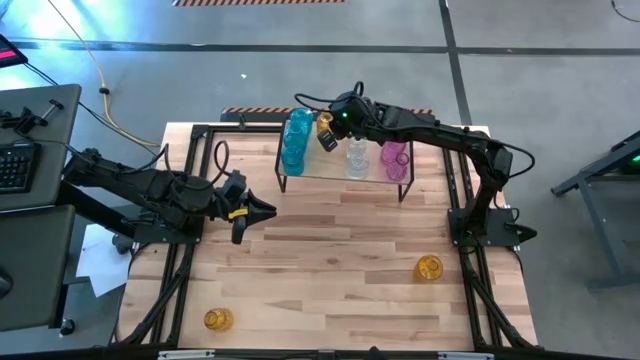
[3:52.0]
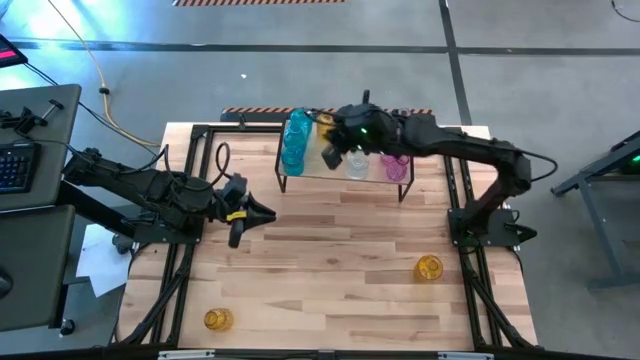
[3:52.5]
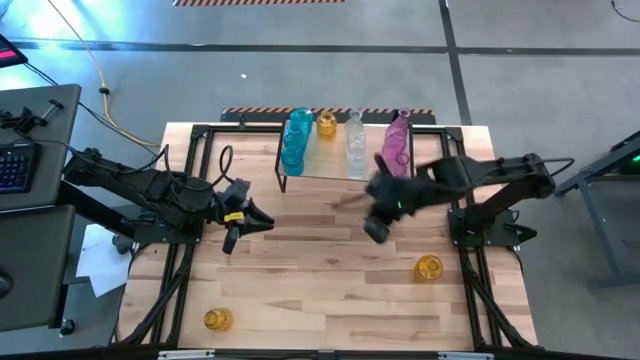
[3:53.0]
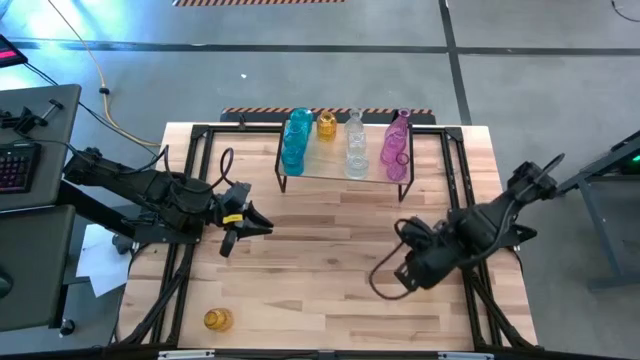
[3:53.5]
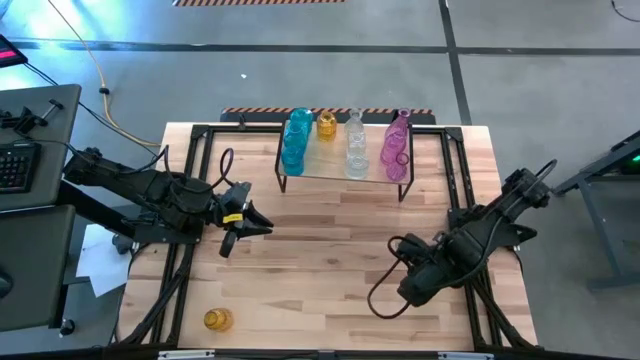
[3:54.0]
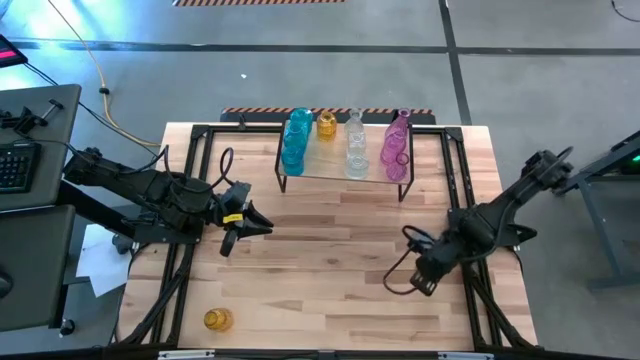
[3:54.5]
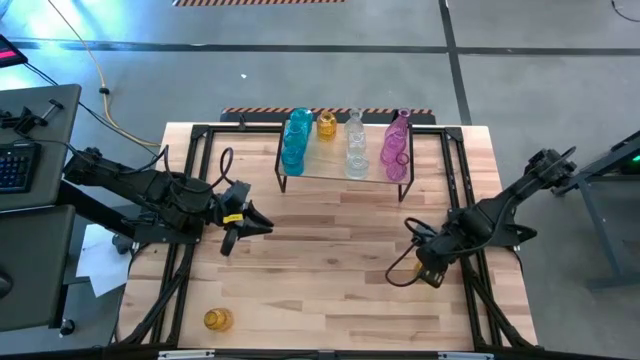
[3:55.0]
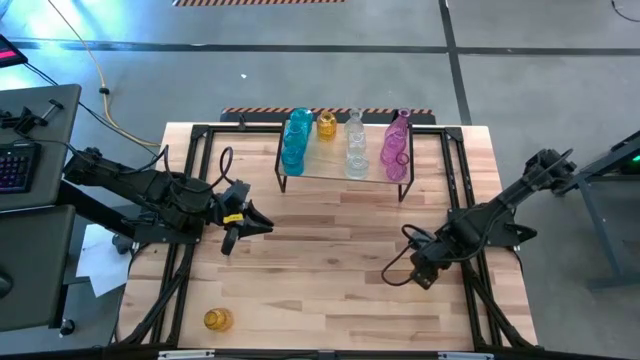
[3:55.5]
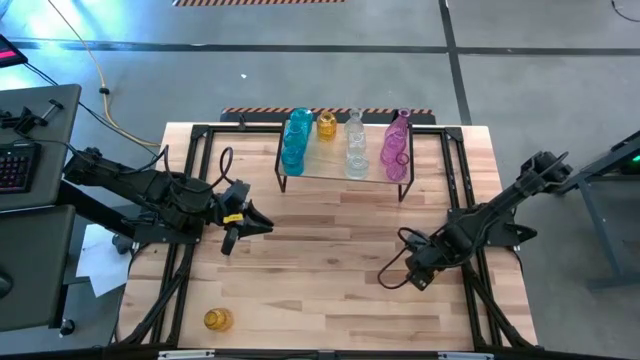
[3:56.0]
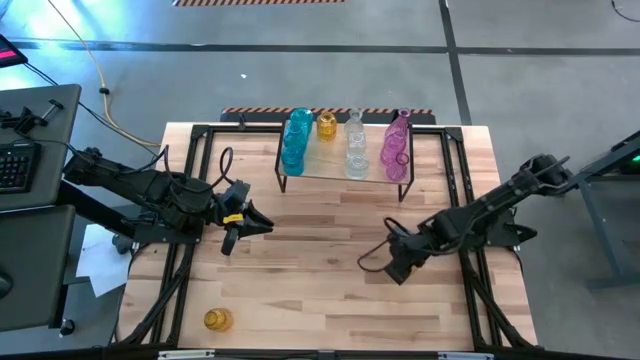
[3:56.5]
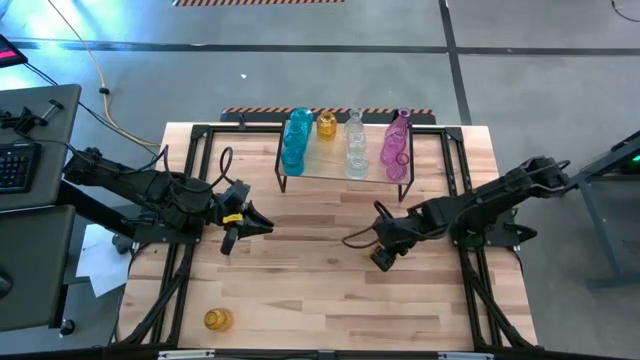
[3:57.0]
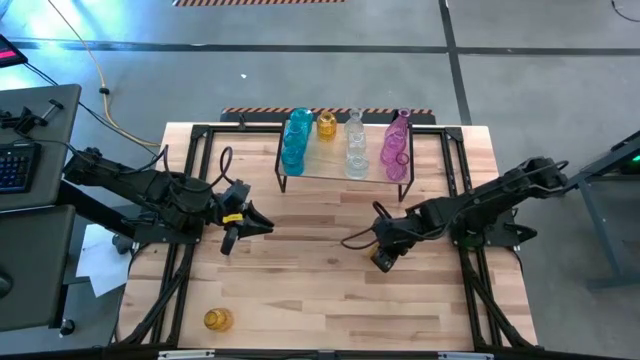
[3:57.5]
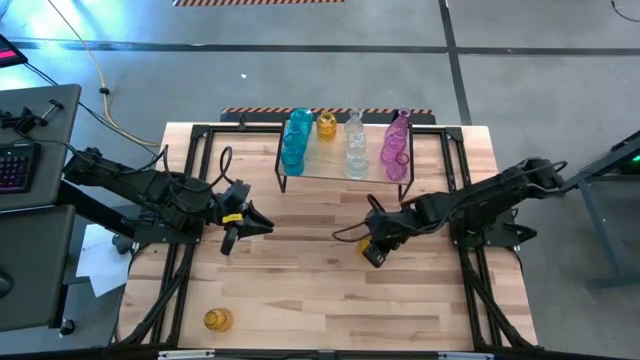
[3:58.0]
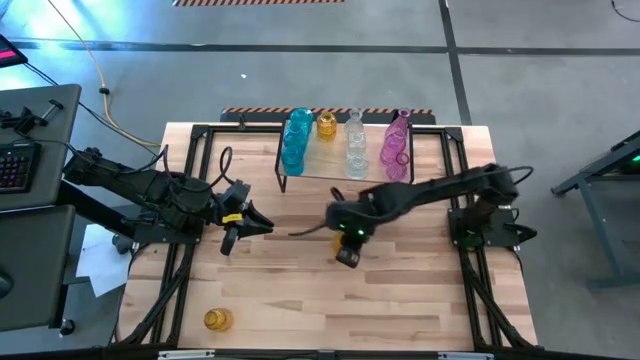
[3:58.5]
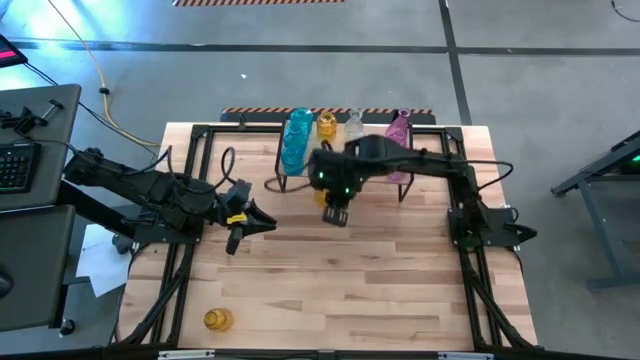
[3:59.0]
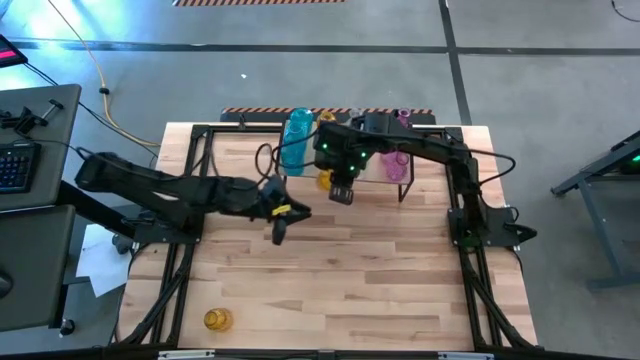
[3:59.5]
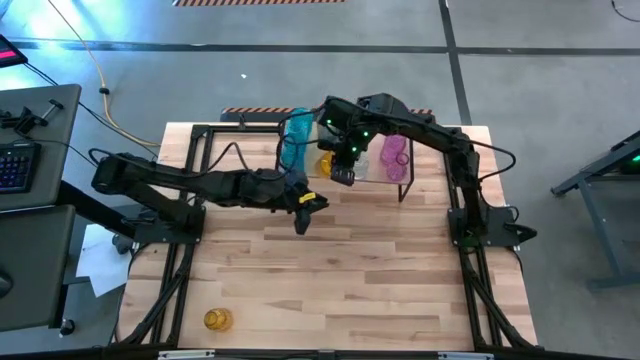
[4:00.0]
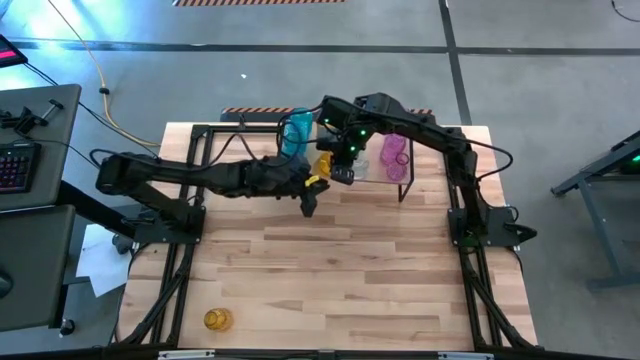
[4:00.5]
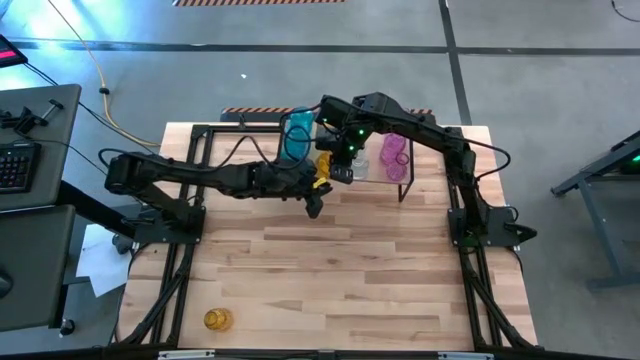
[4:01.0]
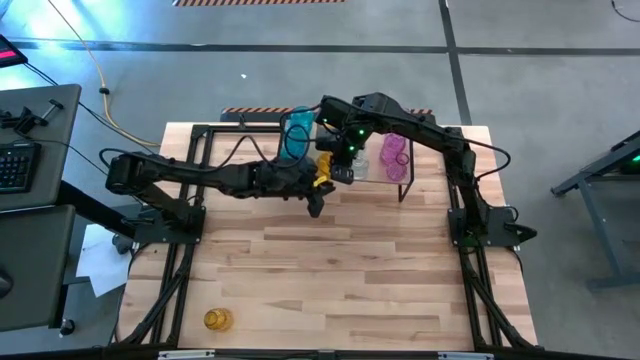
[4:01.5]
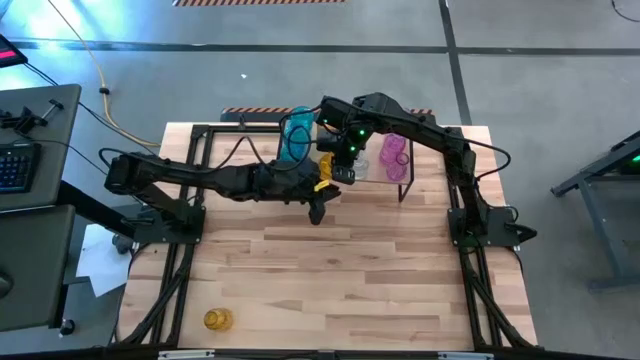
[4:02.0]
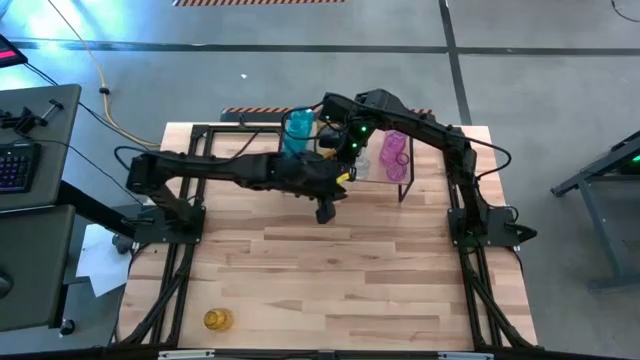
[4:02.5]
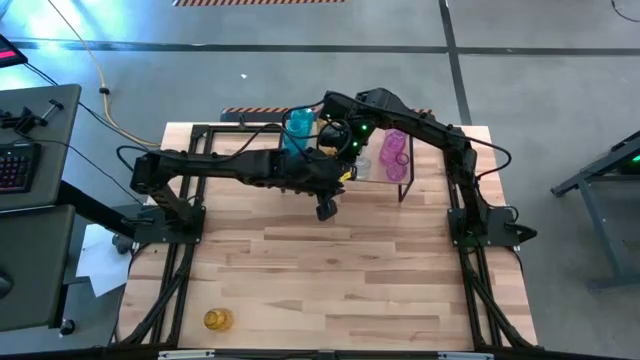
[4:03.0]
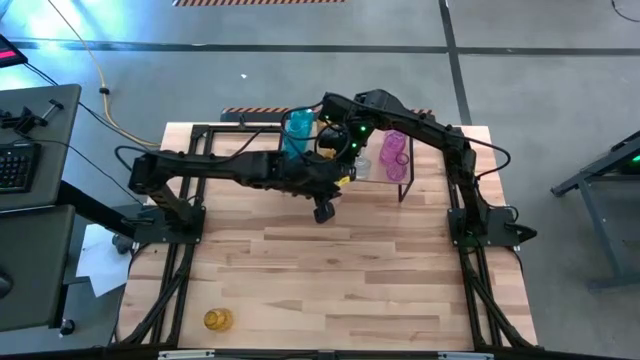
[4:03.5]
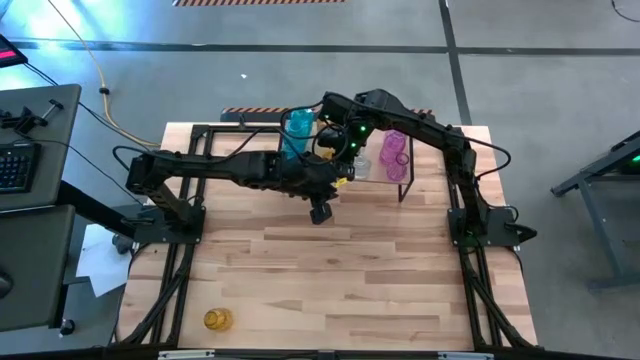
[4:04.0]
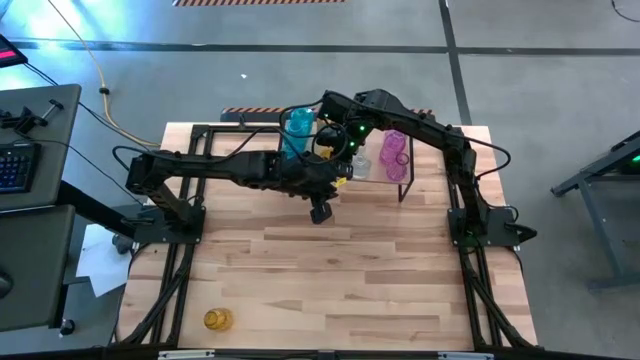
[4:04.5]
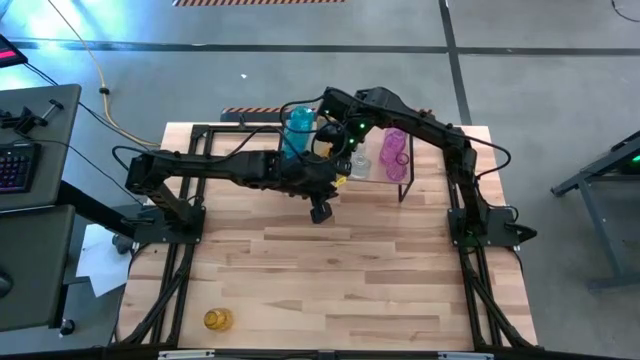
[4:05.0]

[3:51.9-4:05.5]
Task: sort vases onto shelf
Put the right yellow vase on the shelf aligned with the other yellow vase

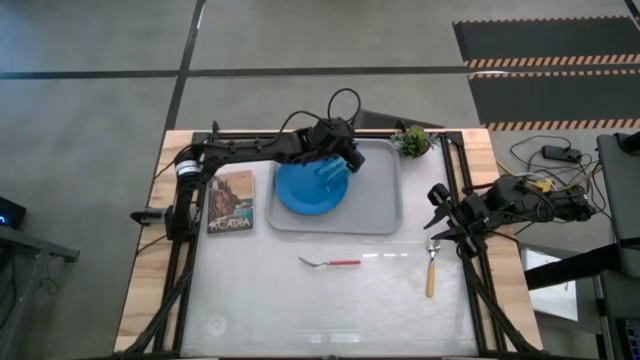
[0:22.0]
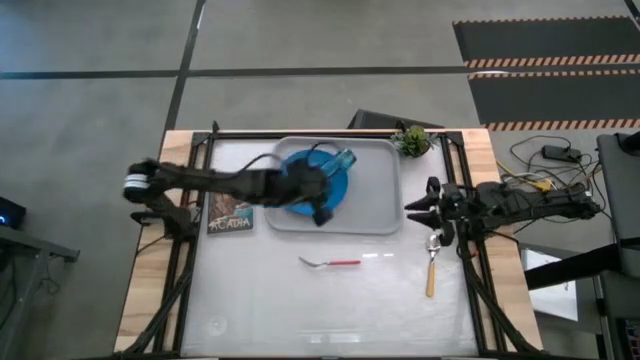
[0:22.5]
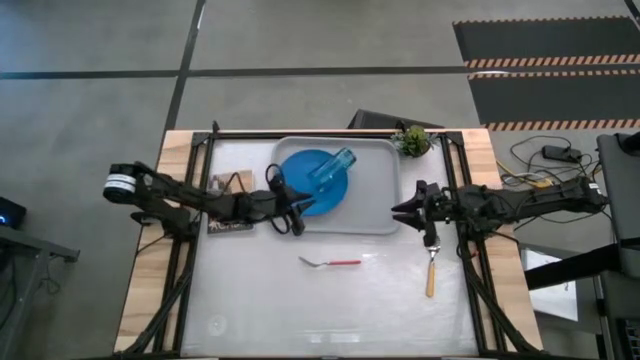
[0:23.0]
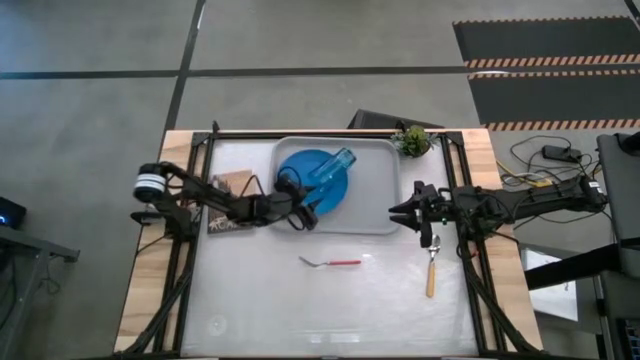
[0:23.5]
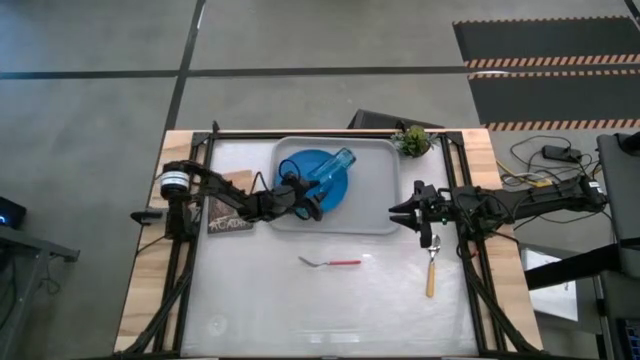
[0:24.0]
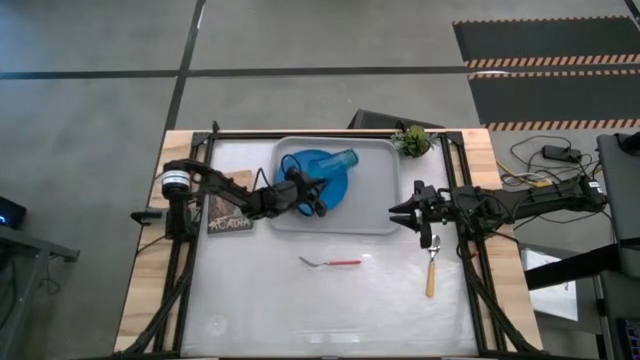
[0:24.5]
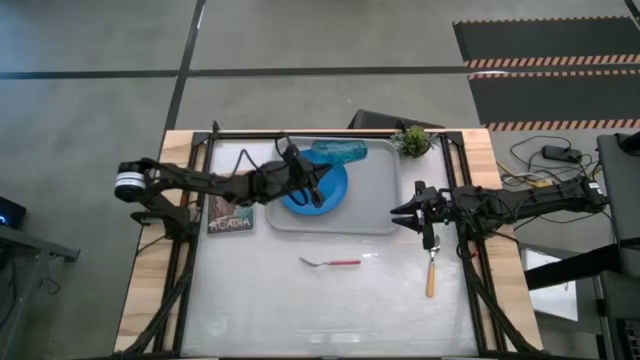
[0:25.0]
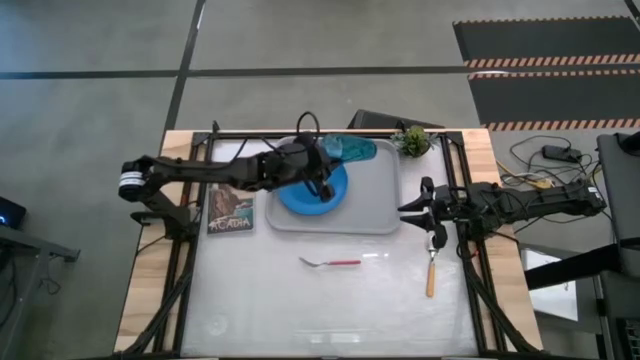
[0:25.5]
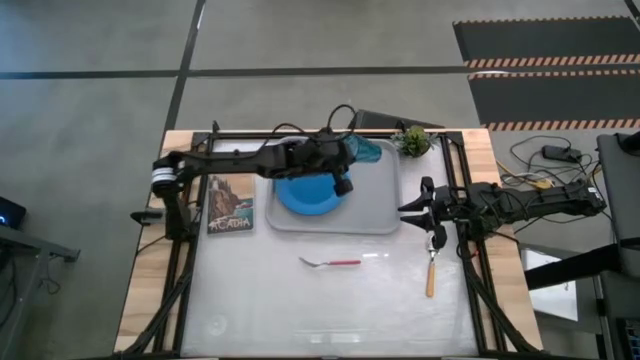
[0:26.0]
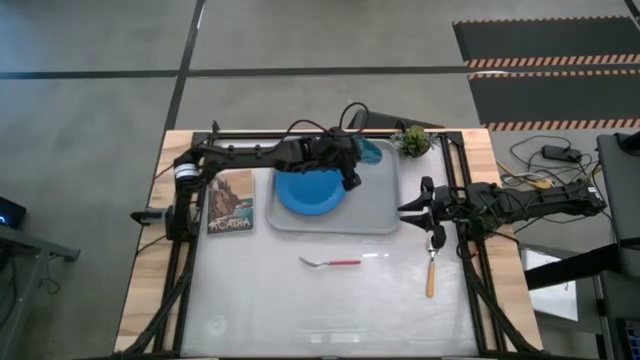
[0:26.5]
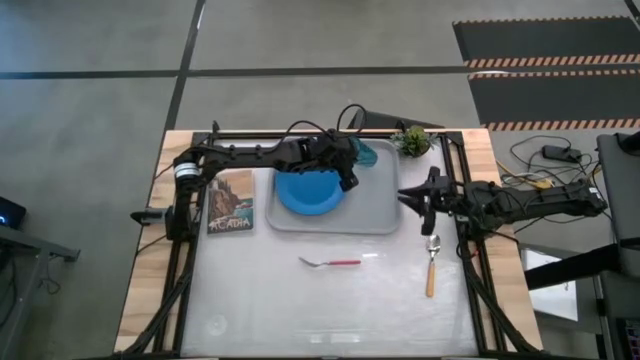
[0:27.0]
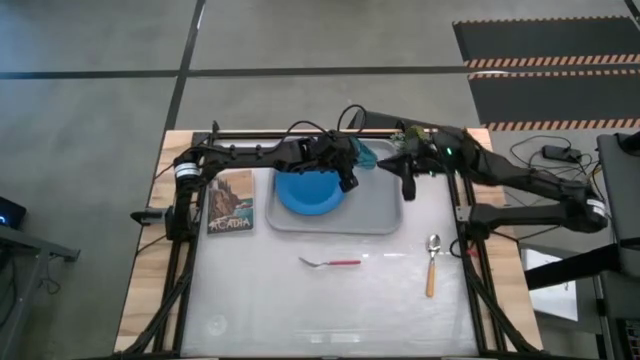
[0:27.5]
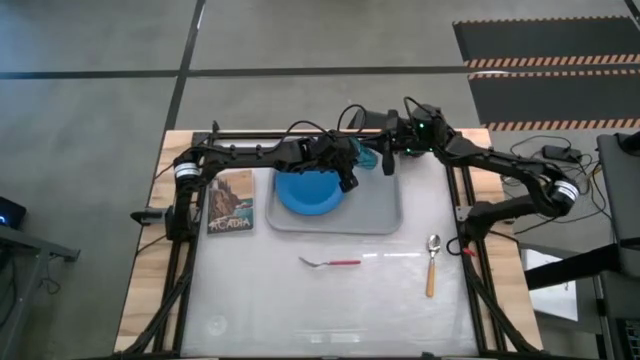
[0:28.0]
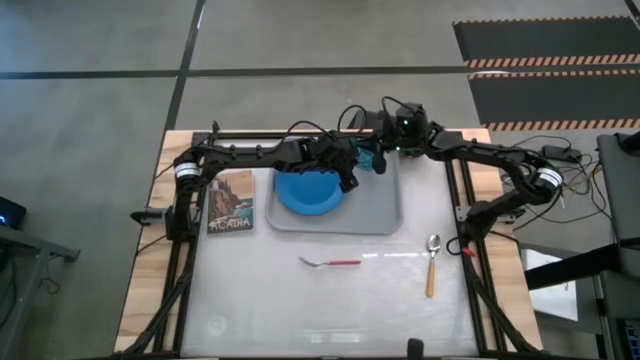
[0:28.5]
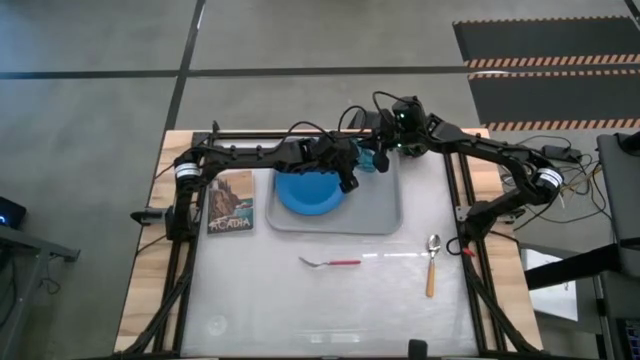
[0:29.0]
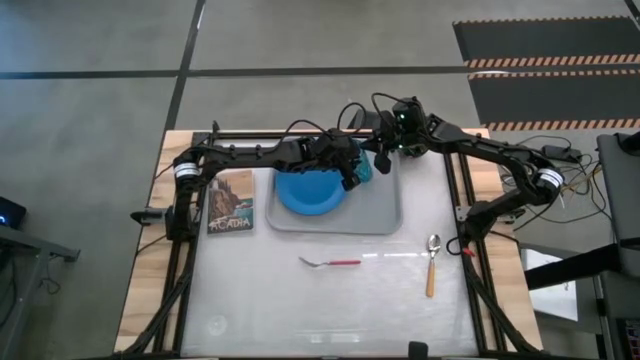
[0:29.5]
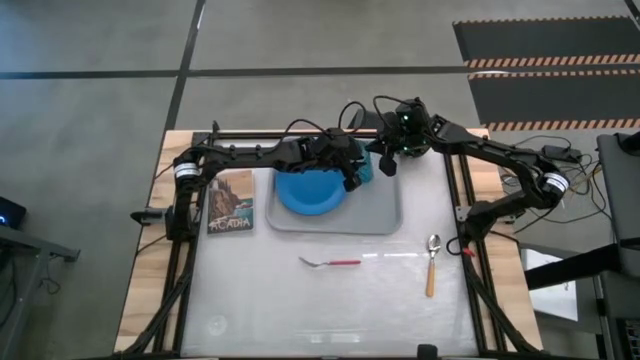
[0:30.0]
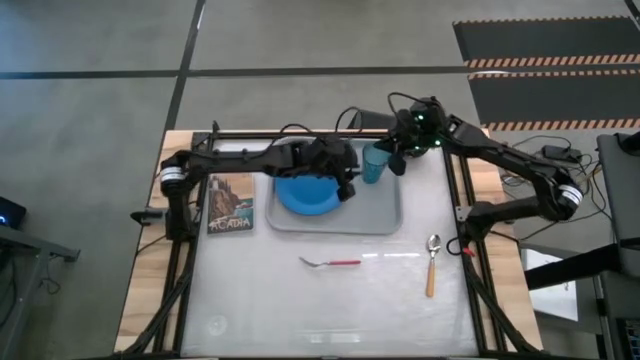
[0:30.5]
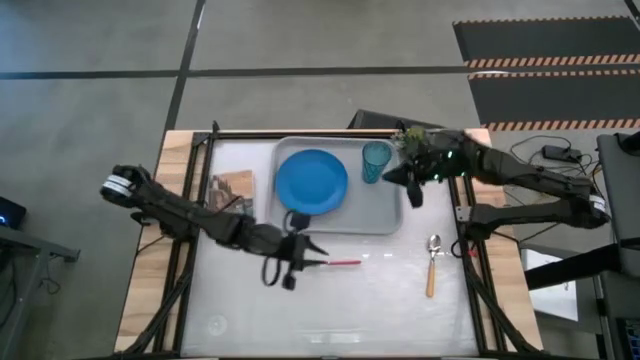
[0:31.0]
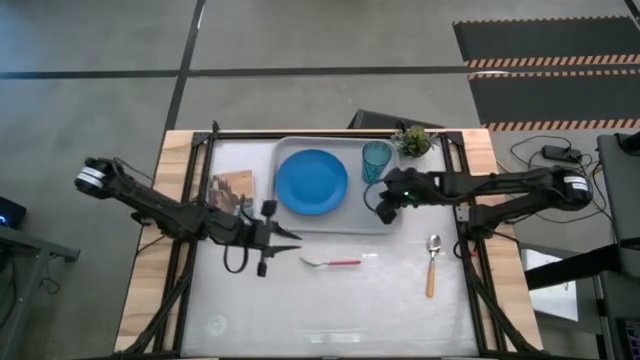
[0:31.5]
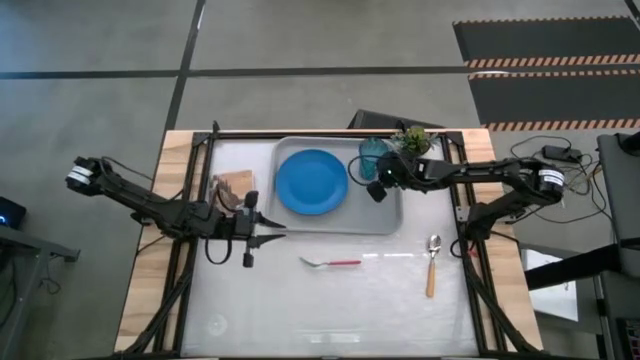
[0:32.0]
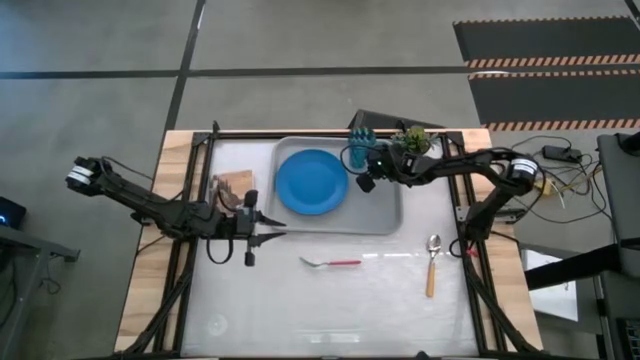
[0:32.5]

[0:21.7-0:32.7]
Task: Pick and place plate/cup/fork/spoon on tray
Put the blue cup beside the blue plate on the gray tray
